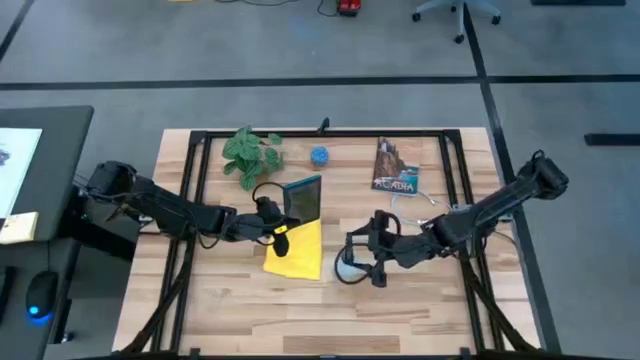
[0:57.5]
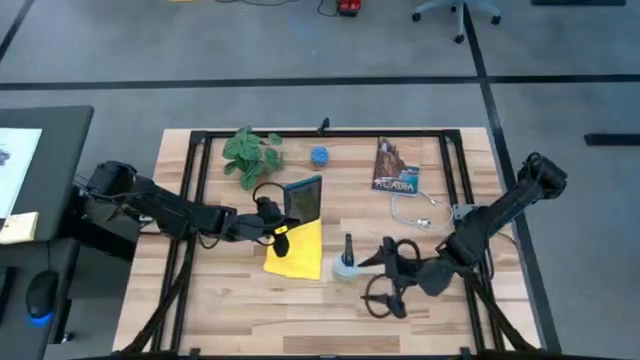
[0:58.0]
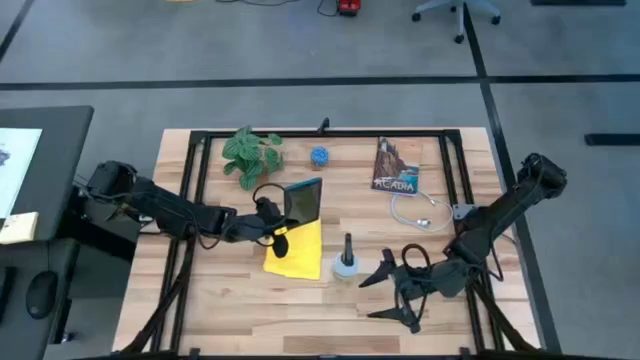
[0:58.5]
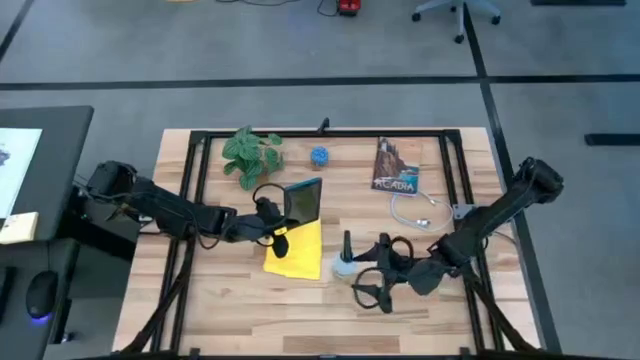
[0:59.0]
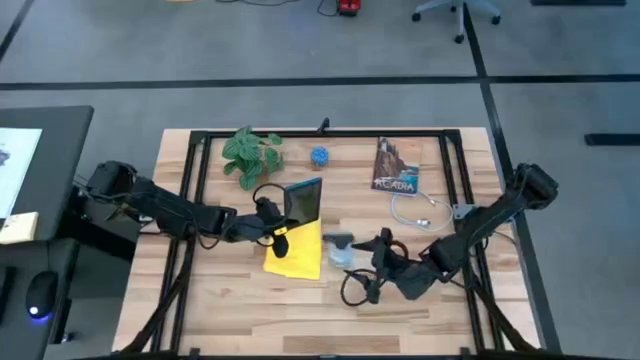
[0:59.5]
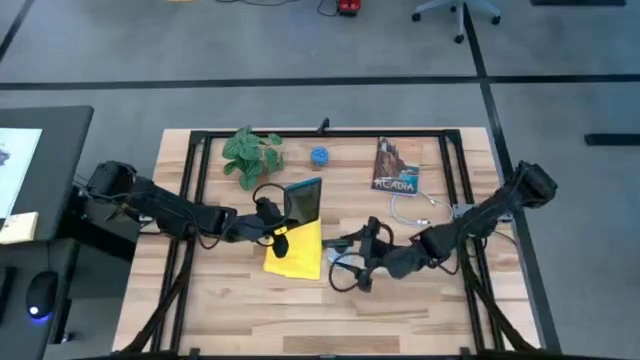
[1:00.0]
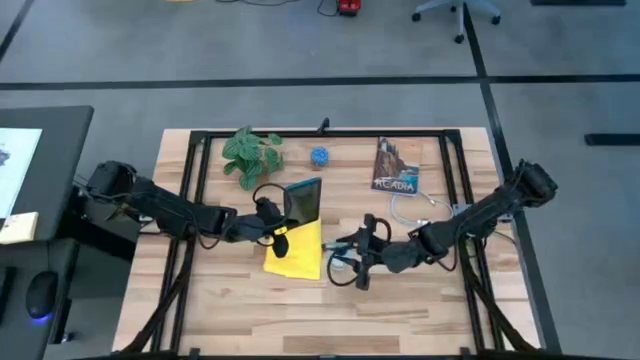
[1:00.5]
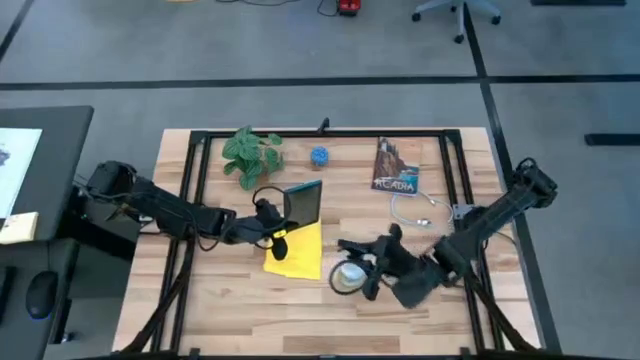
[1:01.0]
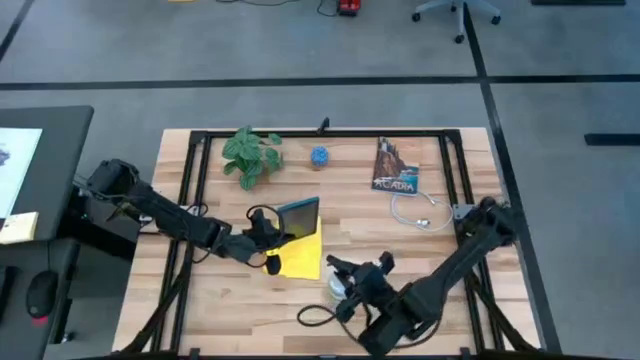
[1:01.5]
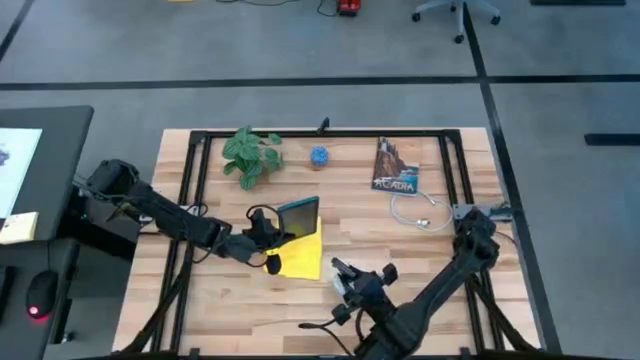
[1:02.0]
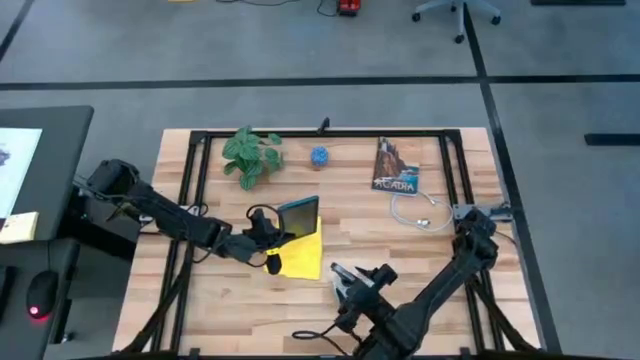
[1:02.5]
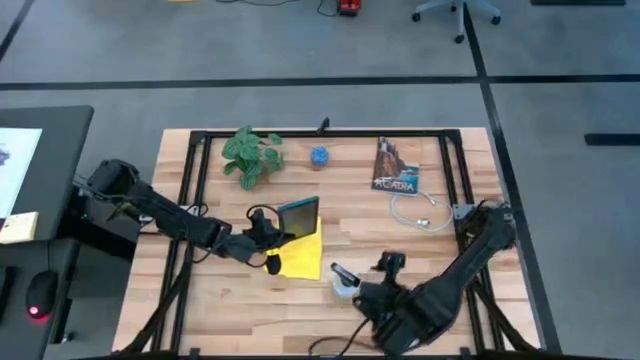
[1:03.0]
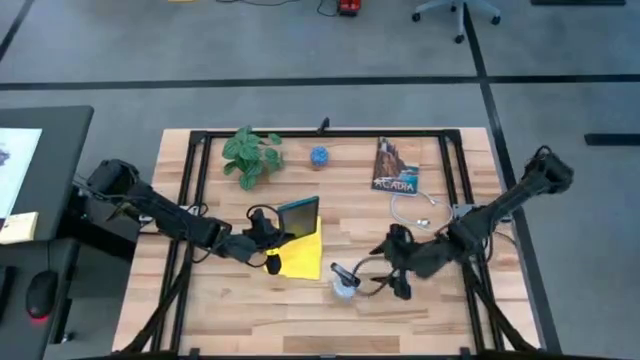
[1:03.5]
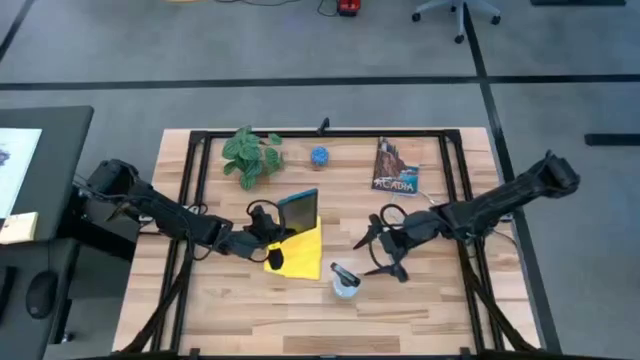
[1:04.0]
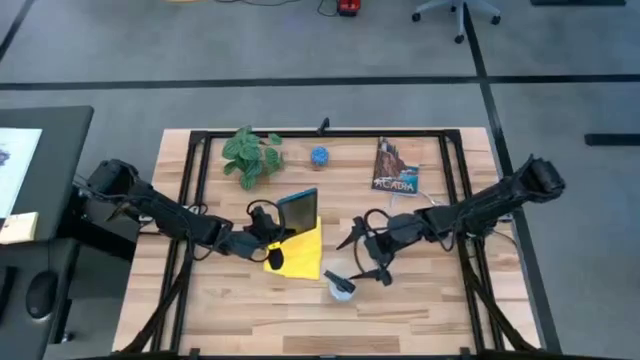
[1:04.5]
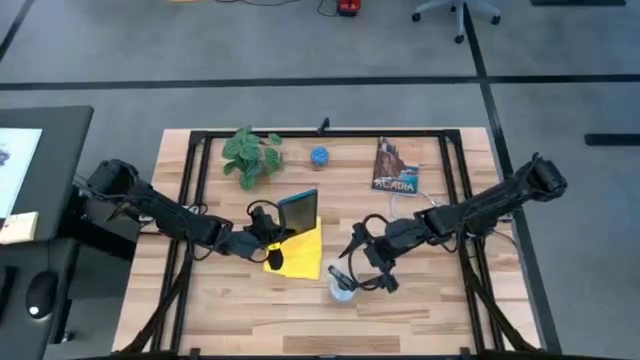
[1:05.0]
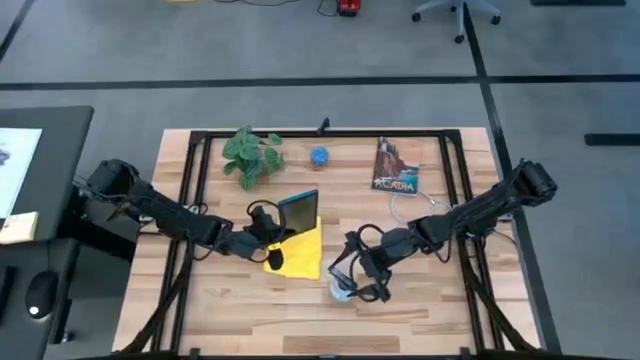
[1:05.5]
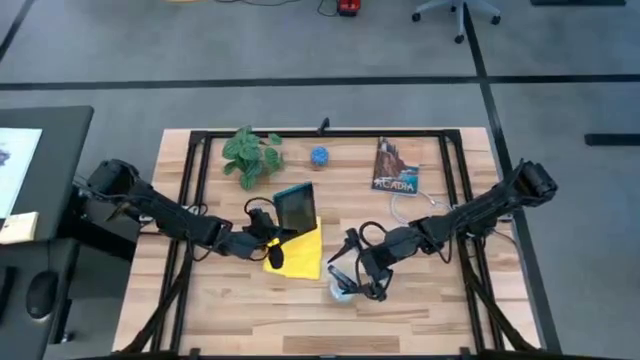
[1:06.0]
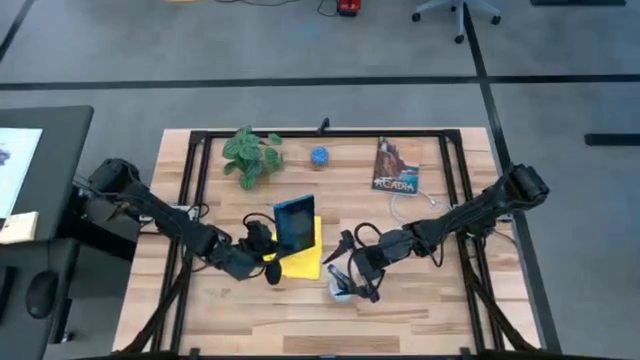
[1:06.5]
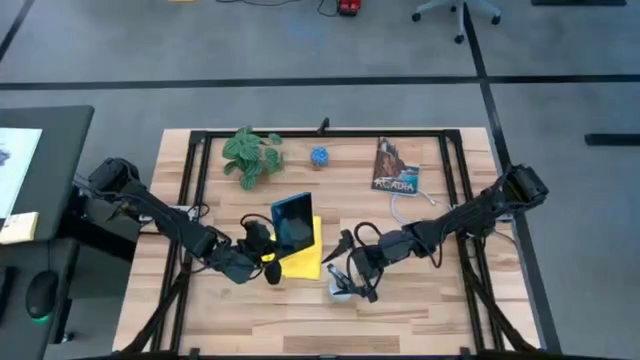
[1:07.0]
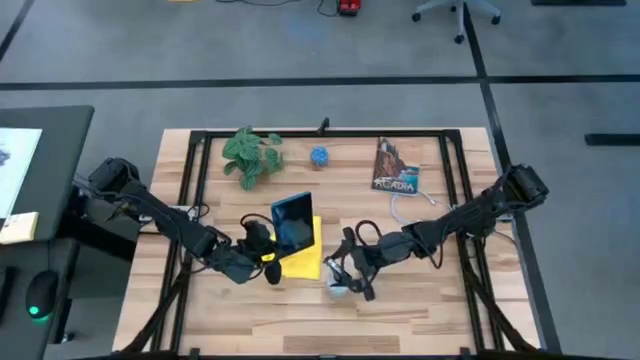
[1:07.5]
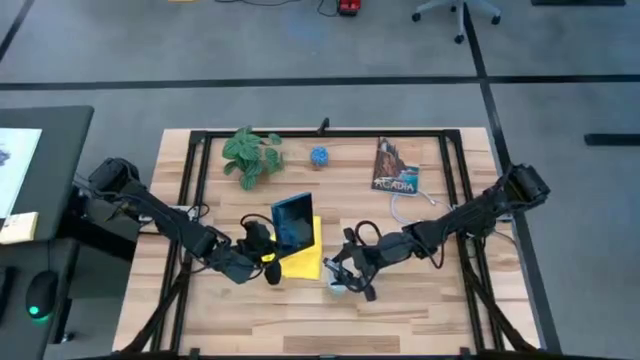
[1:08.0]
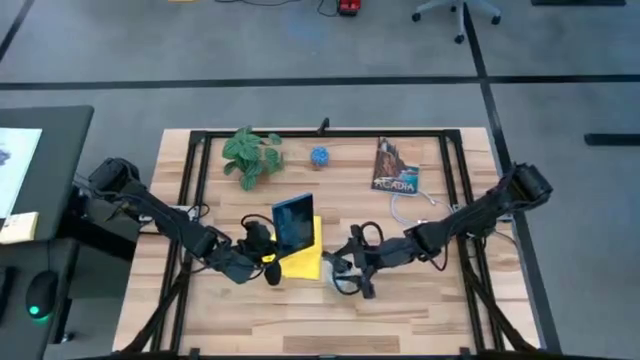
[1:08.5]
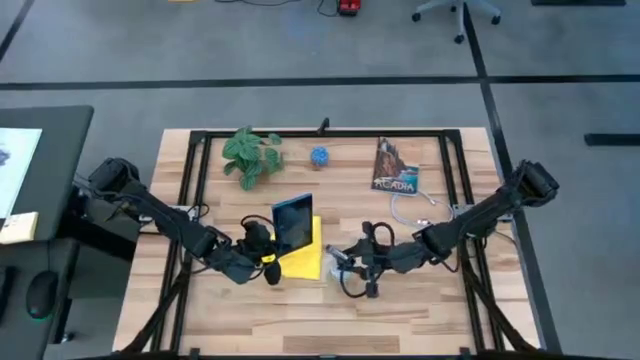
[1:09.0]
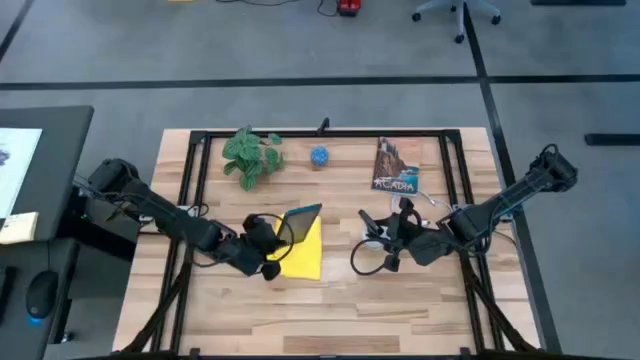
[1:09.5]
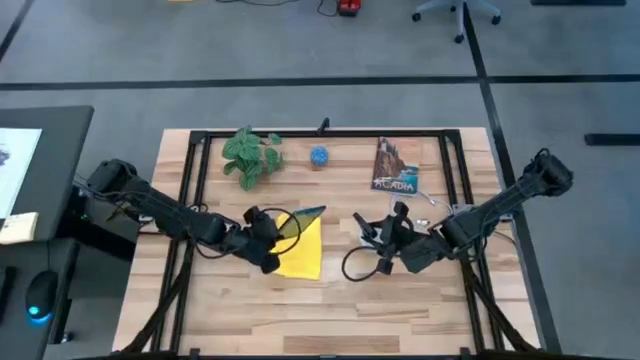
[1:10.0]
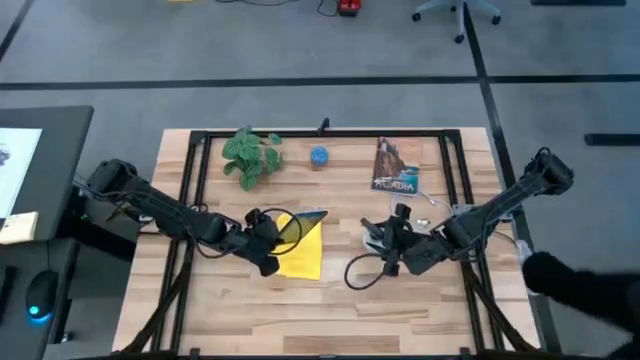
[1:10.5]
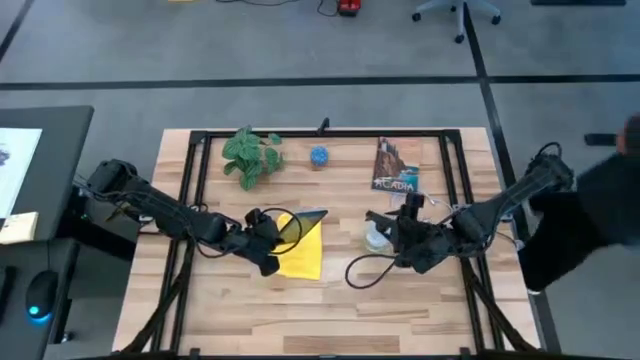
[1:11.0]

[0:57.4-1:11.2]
Task: Apply microfiber cloth
Spray the blue tablet with the white spray bottle

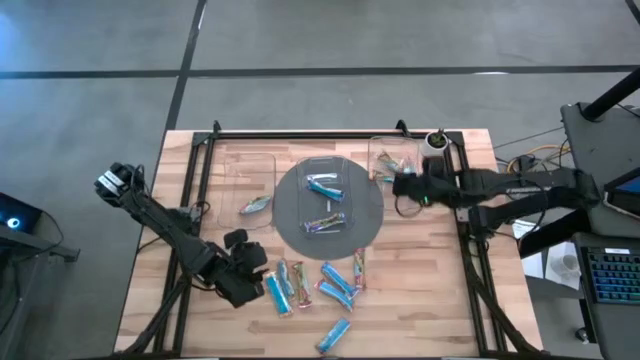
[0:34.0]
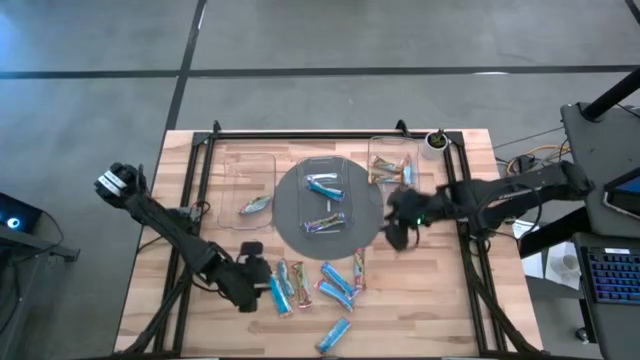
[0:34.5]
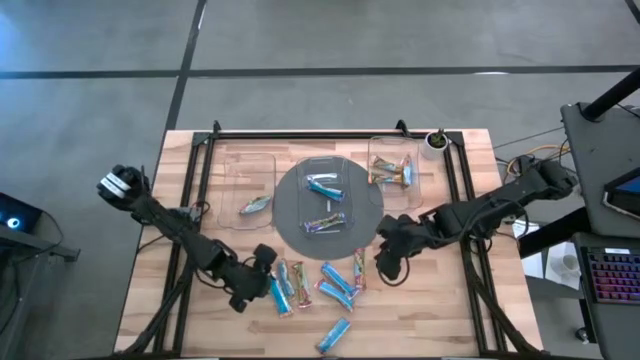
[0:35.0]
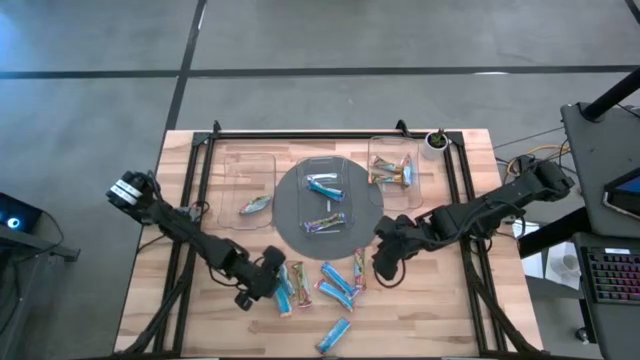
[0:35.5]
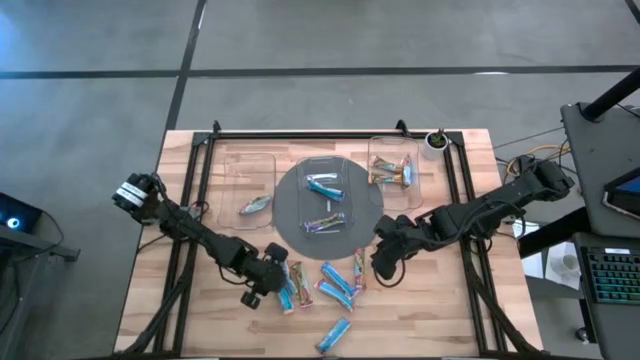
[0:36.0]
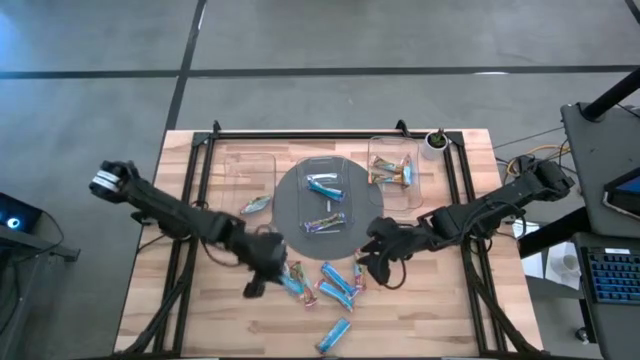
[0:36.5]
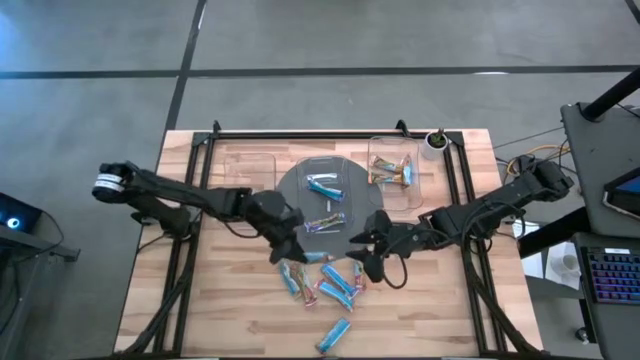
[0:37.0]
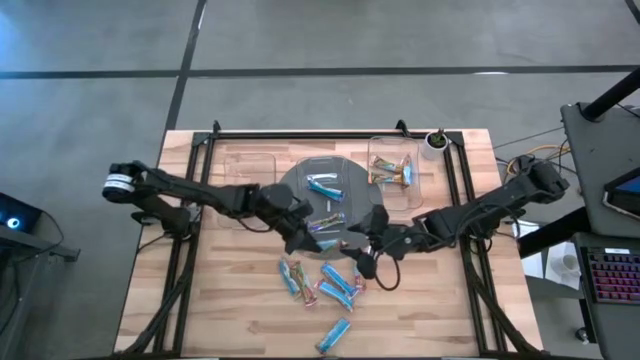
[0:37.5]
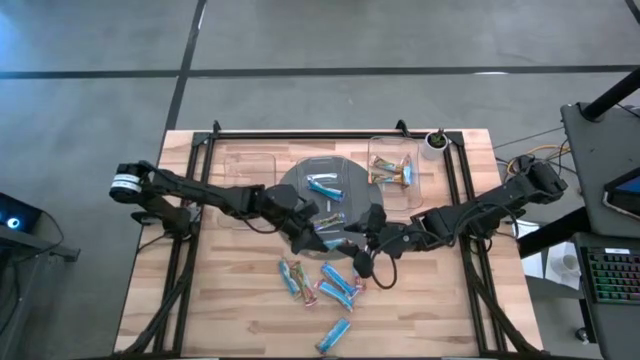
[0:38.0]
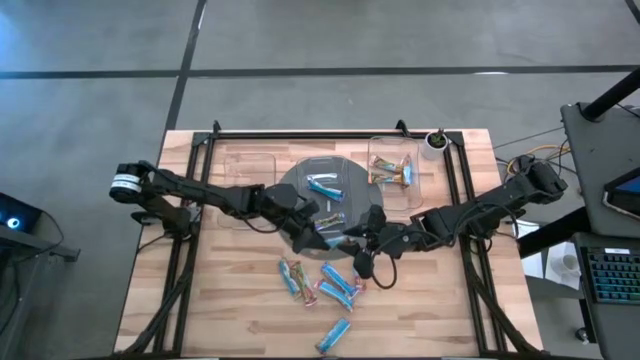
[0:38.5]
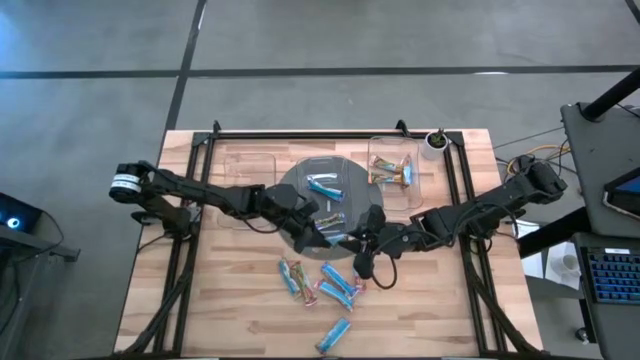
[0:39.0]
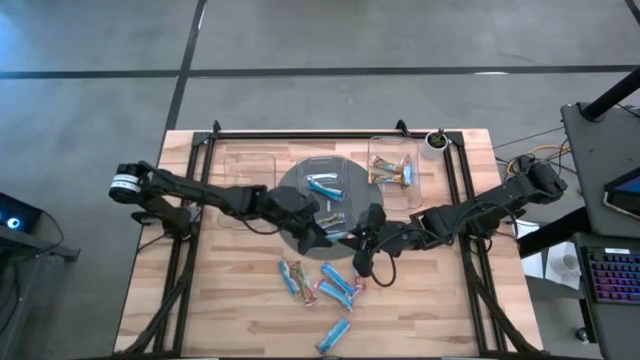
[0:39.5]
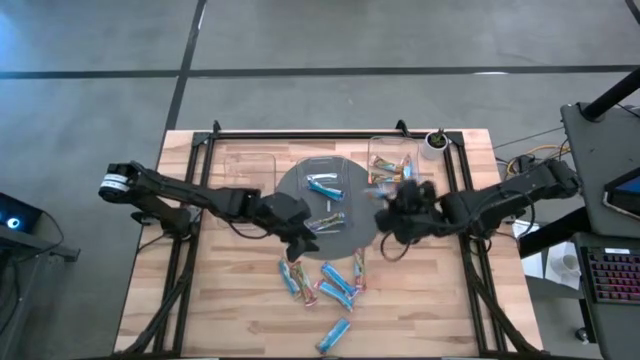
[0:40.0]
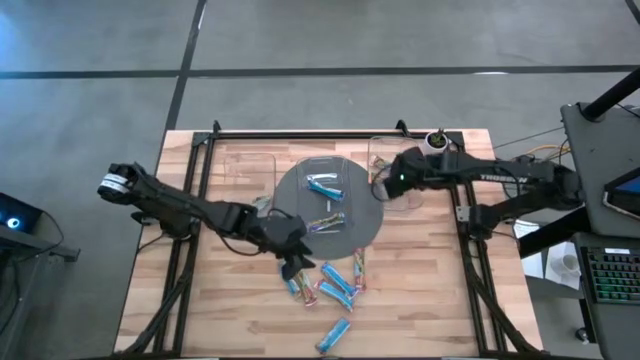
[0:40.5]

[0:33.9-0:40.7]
Task: Pick and place Granola Bars by type
Put the yellow granola bar into the right transparent bin
